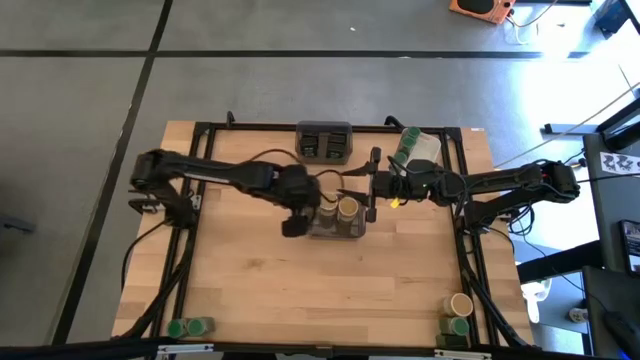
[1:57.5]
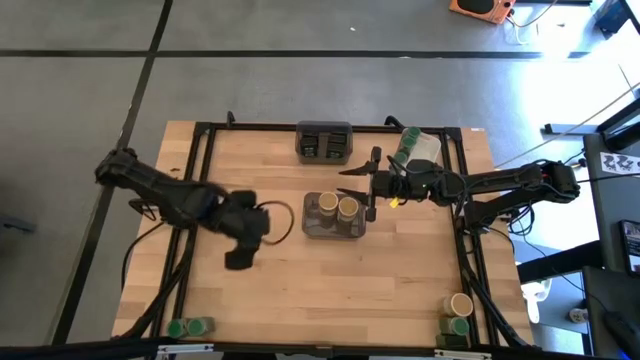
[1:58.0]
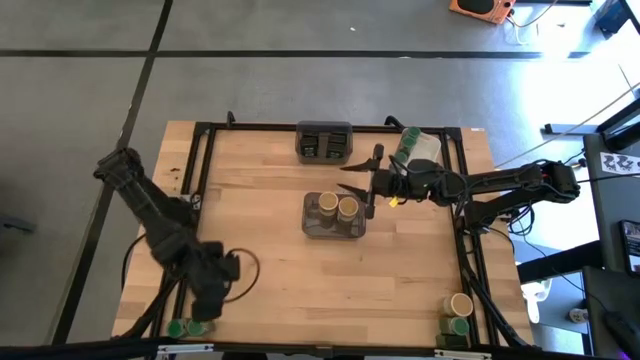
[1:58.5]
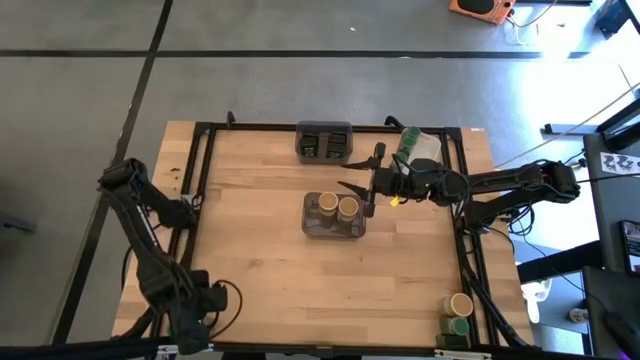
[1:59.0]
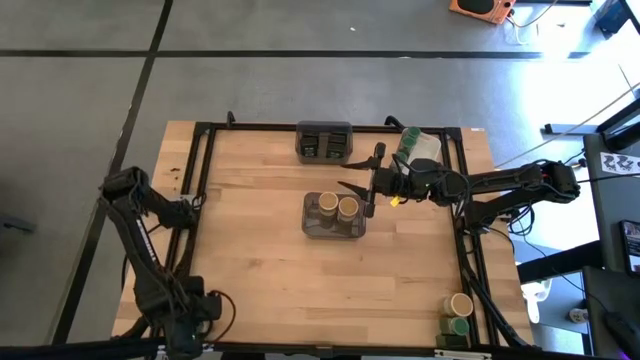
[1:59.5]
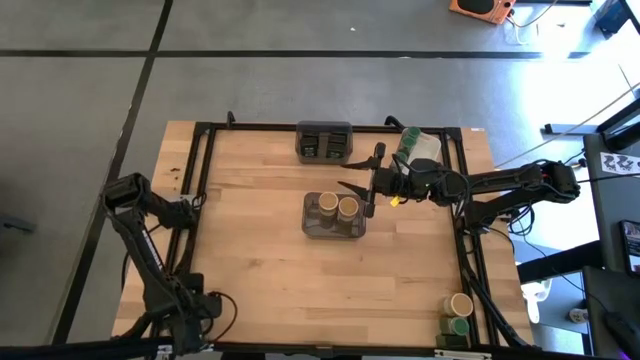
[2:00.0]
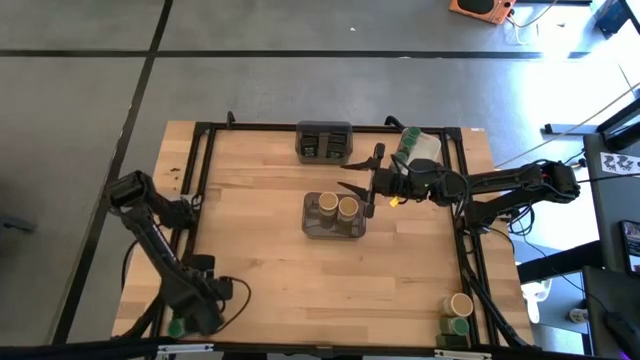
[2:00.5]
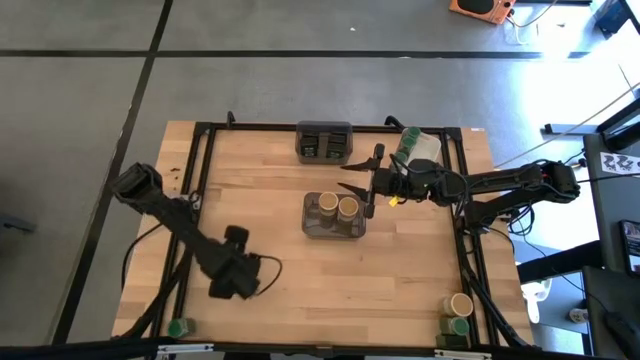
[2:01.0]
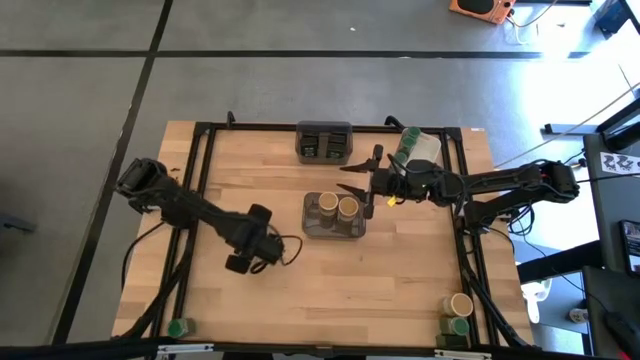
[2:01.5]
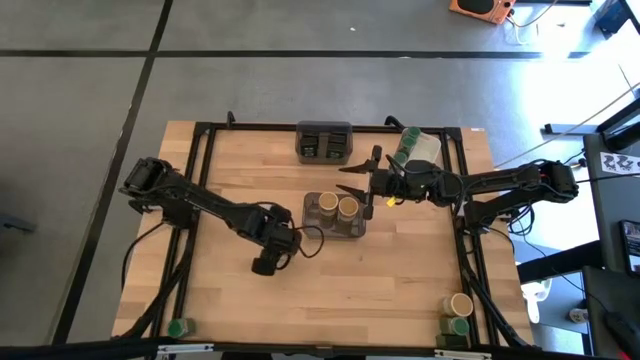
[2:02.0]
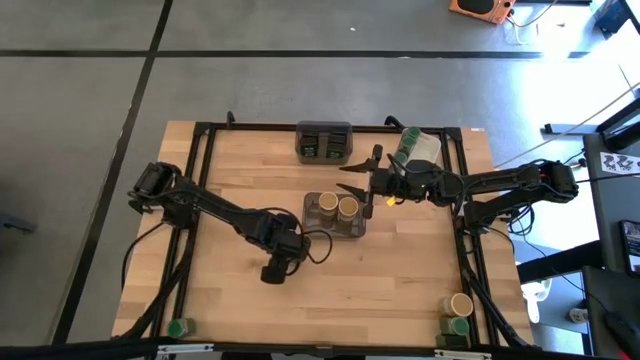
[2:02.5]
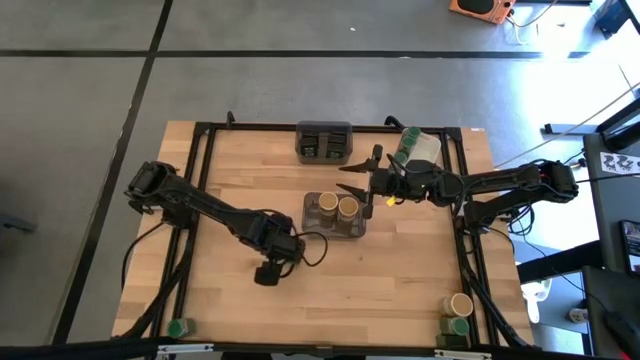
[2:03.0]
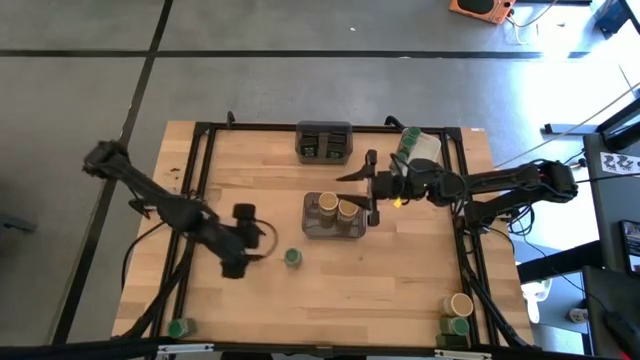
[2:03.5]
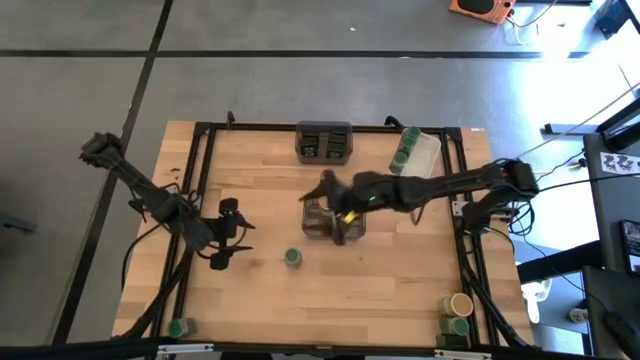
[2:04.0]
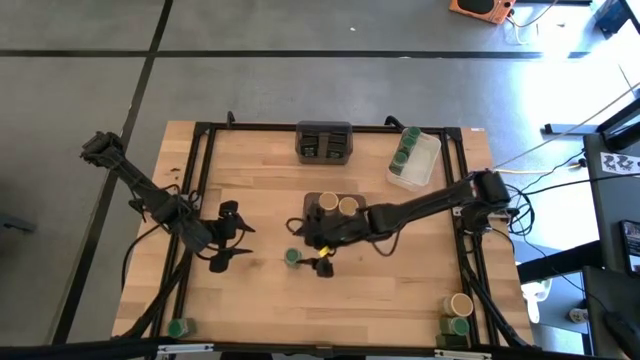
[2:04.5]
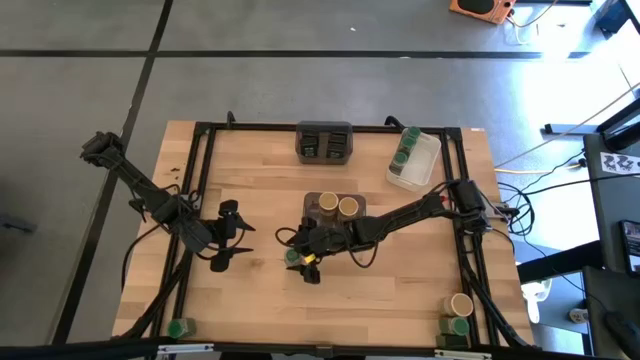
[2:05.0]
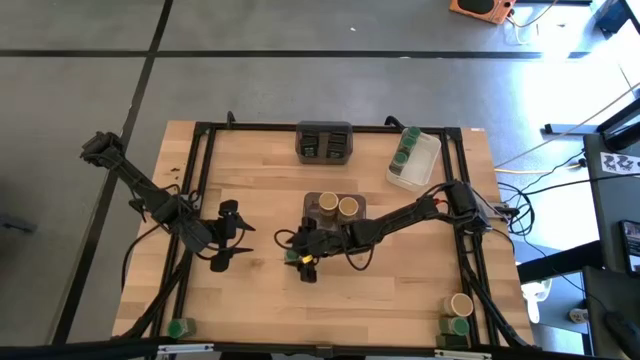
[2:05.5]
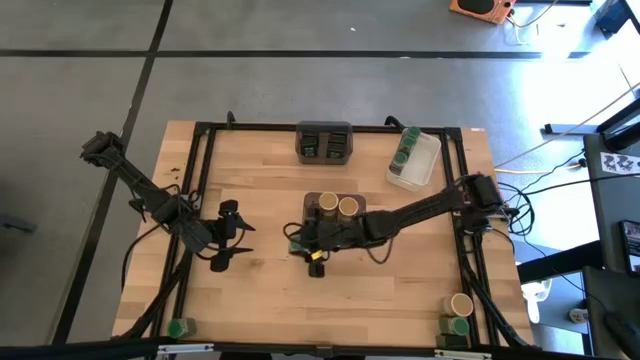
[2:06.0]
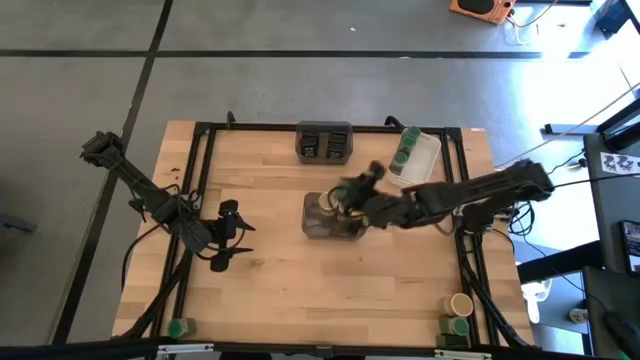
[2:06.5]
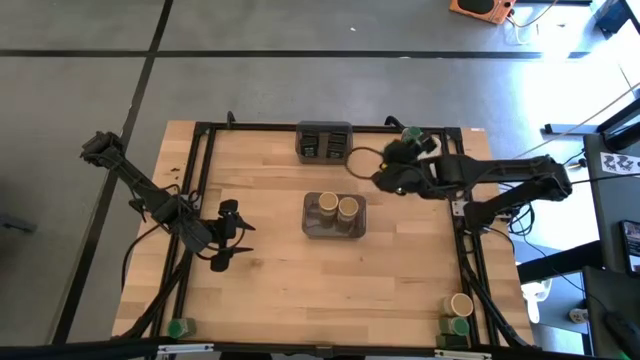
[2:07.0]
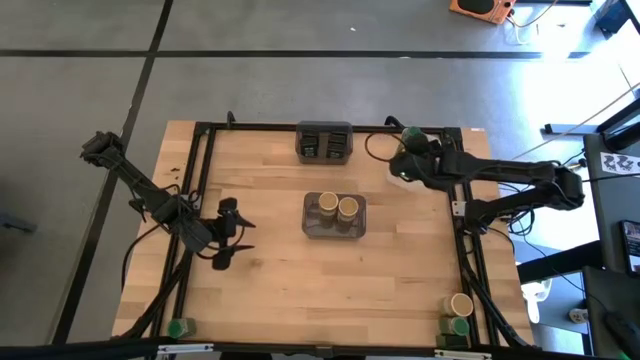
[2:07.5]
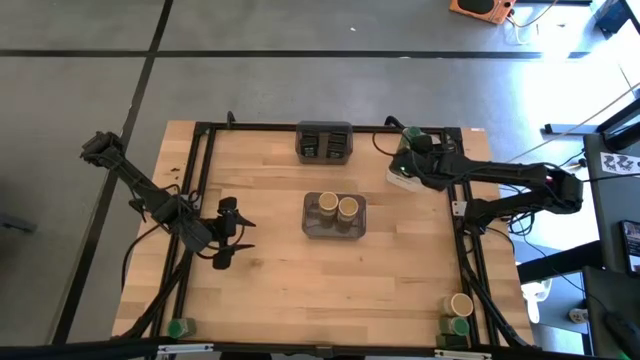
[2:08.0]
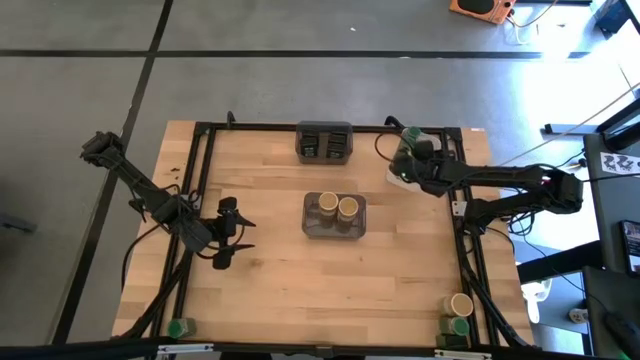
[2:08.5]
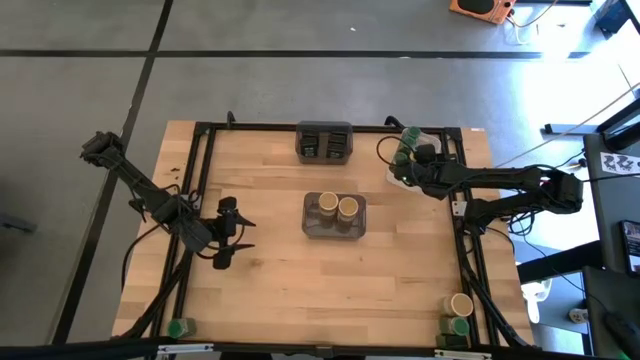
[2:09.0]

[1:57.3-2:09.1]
Task: Sort spices by type
Put the green seasoning bottle into the white bin

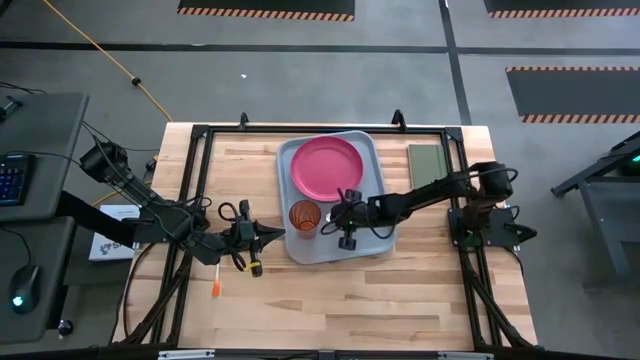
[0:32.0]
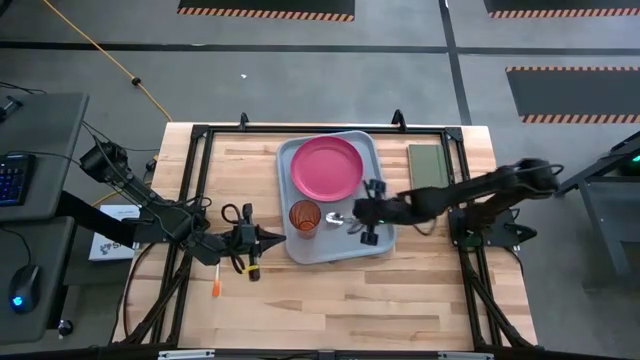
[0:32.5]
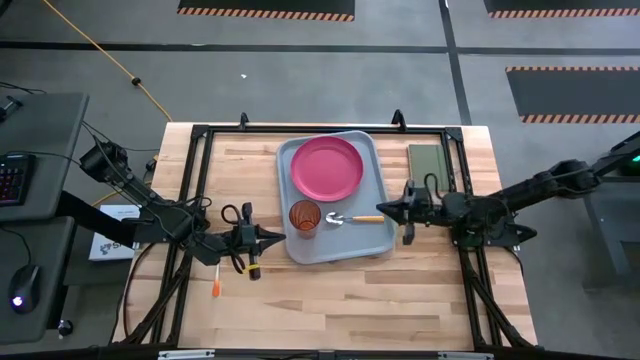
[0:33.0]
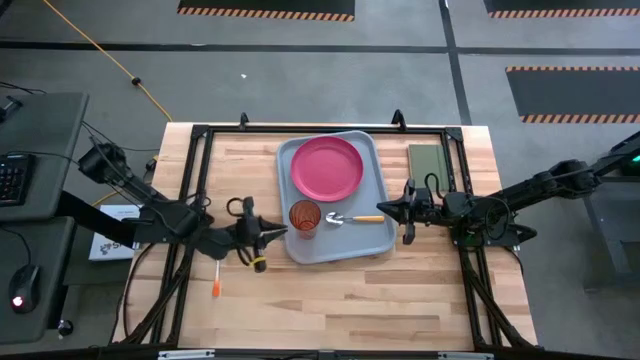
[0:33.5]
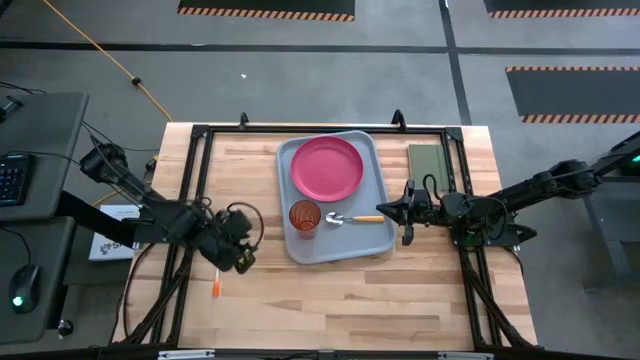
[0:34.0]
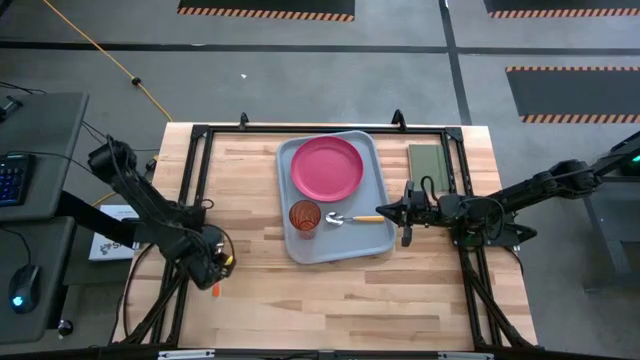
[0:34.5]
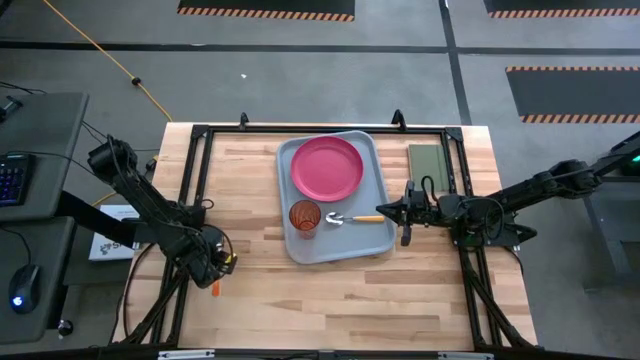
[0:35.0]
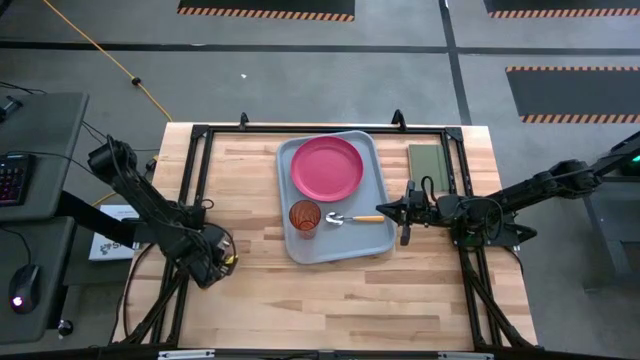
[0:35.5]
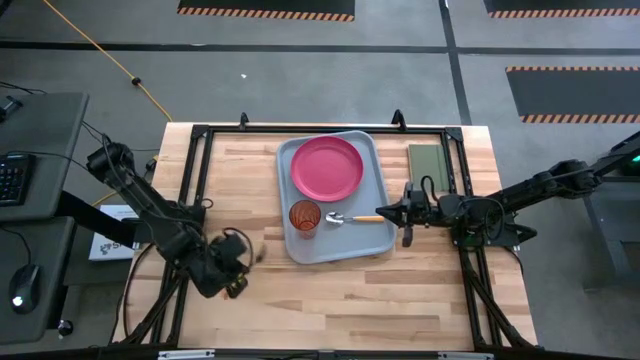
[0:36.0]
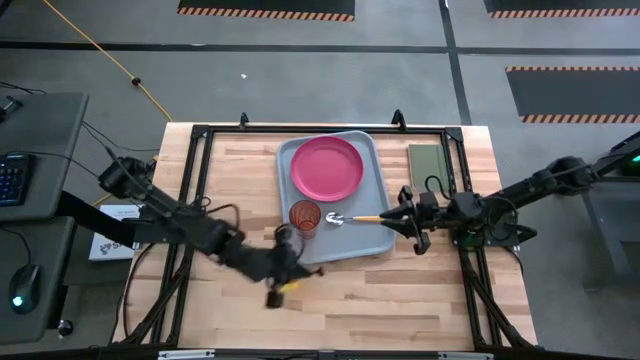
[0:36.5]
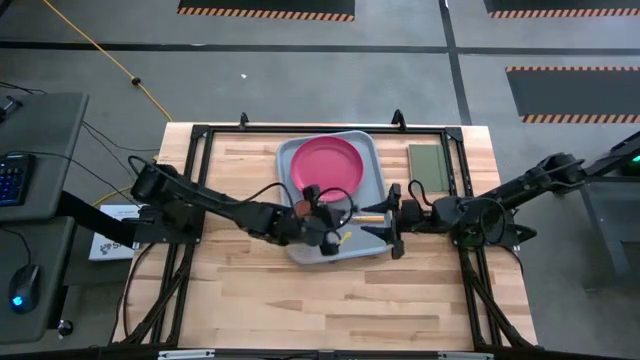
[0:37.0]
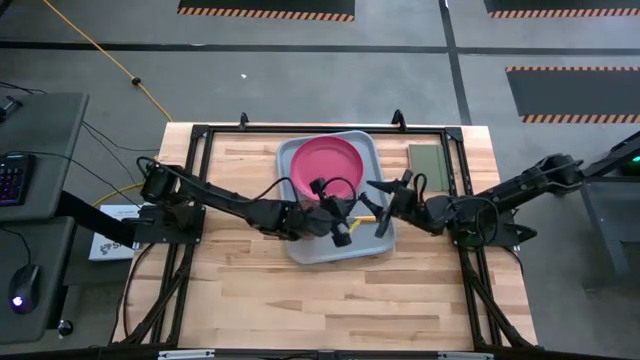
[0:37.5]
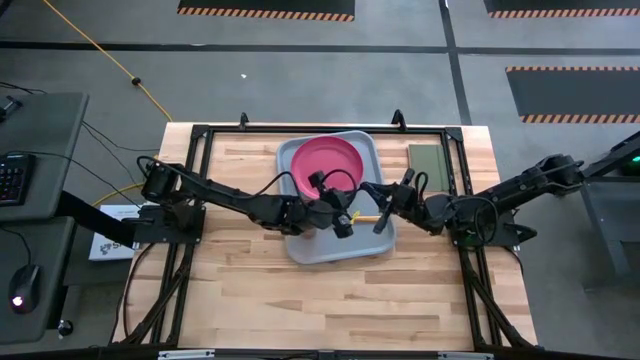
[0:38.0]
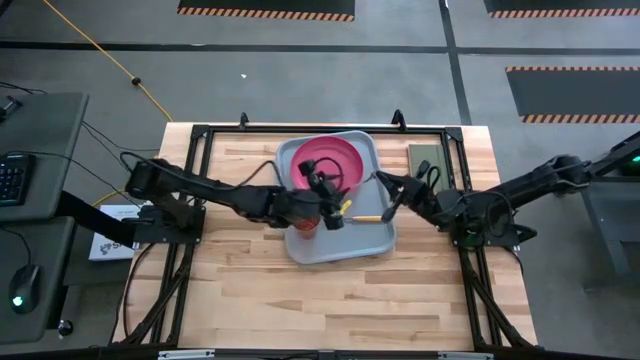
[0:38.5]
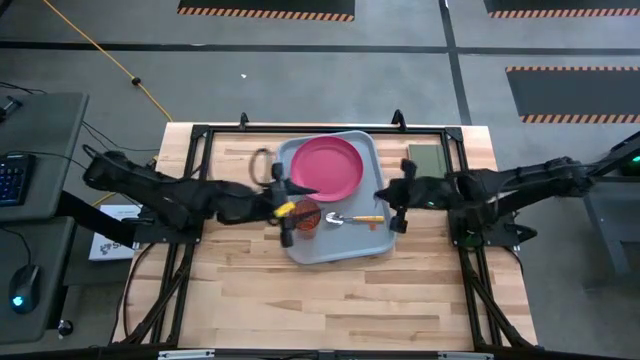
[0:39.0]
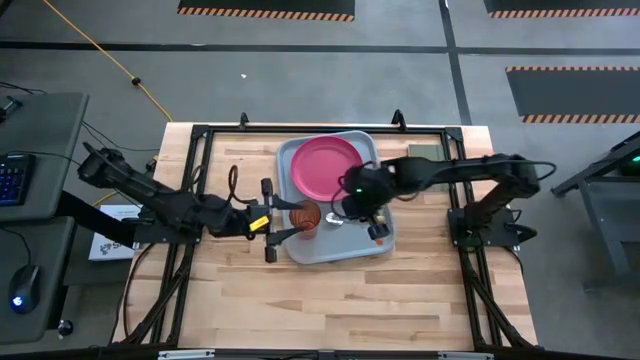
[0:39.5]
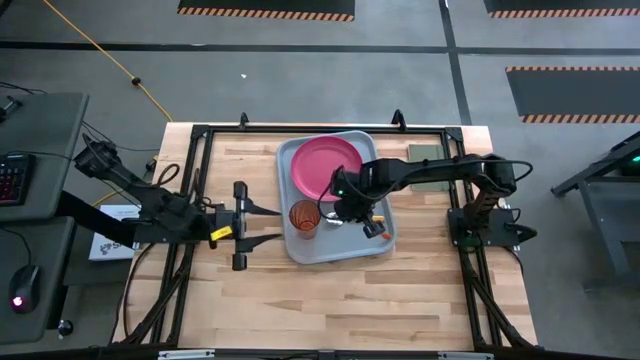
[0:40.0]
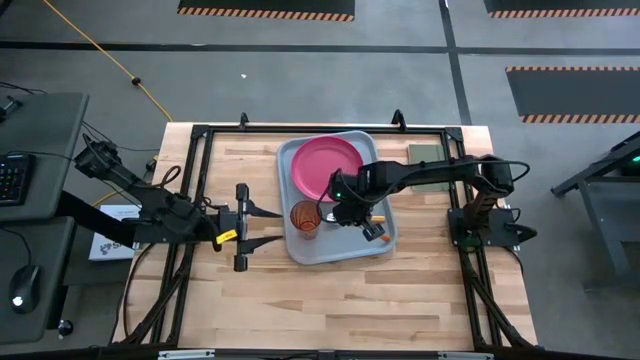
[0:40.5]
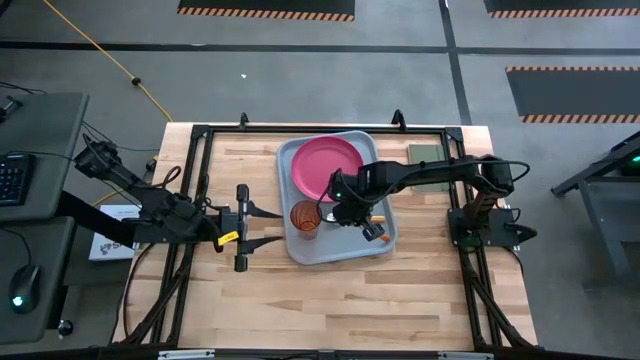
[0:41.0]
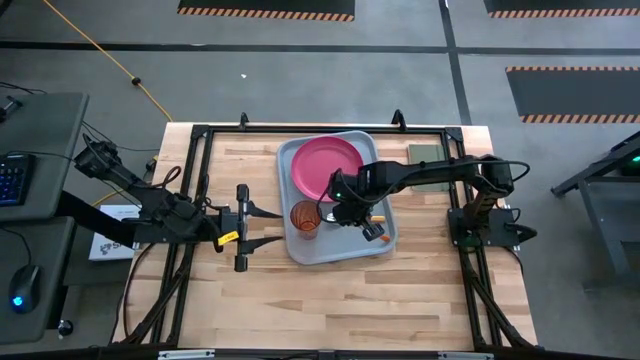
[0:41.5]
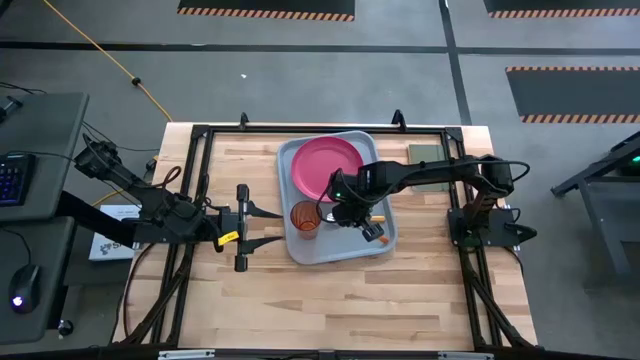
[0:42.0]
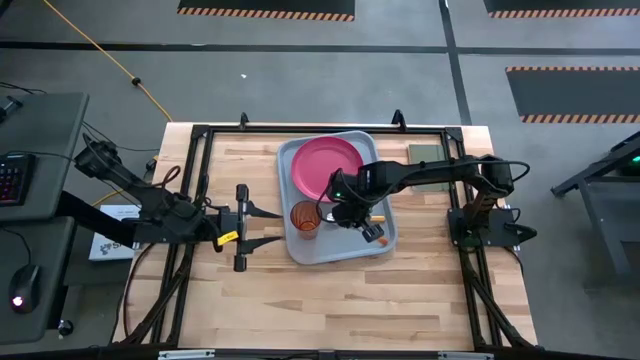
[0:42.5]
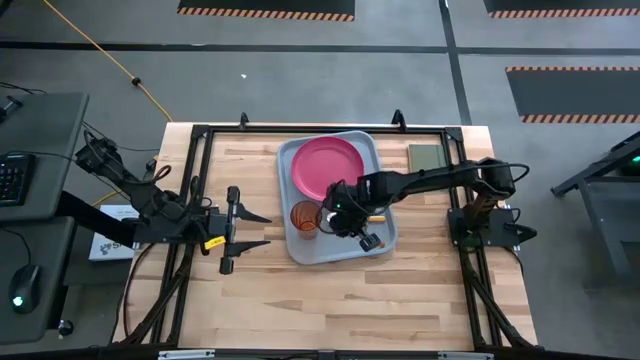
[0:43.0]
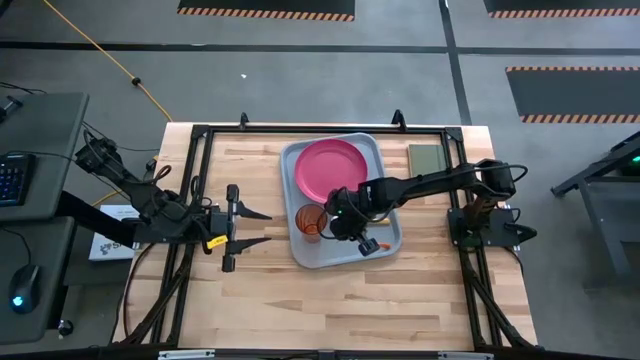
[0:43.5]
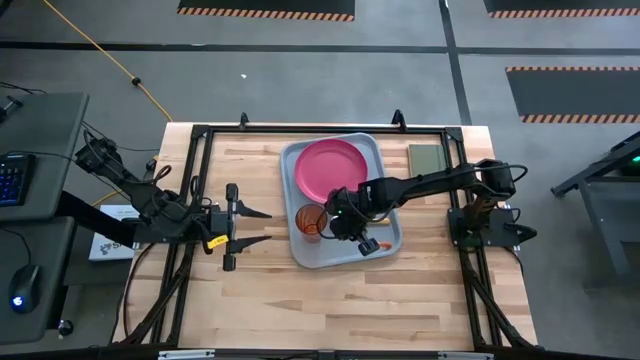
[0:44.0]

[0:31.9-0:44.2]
Task: Pick and place plate/cup/fork/spoon on tray
Put the orange fork on the gray serving tray to the bottom of the yellow spoon
